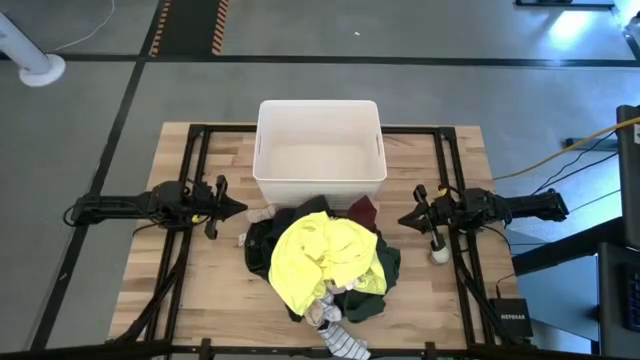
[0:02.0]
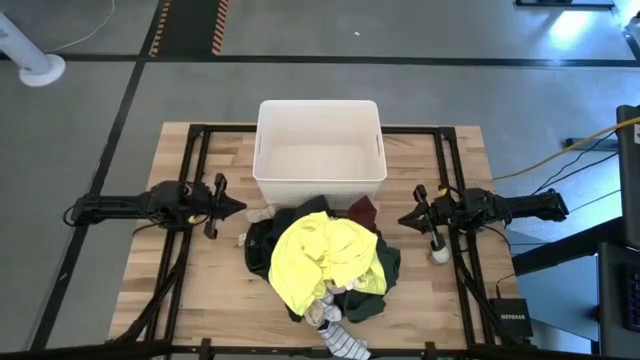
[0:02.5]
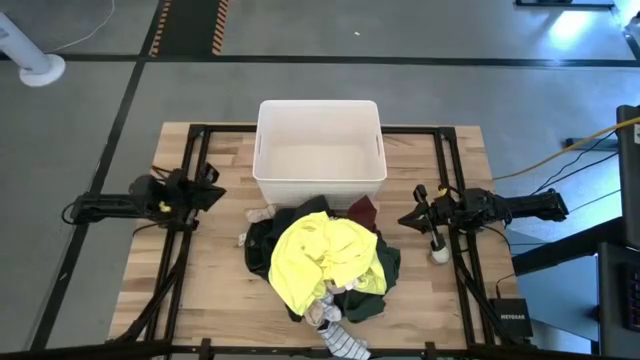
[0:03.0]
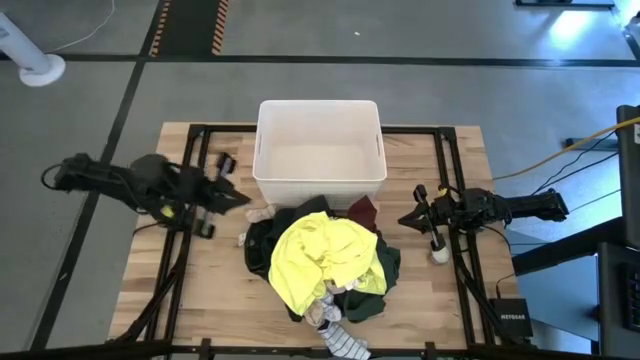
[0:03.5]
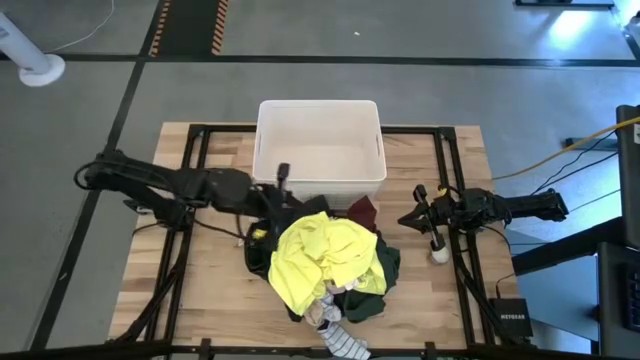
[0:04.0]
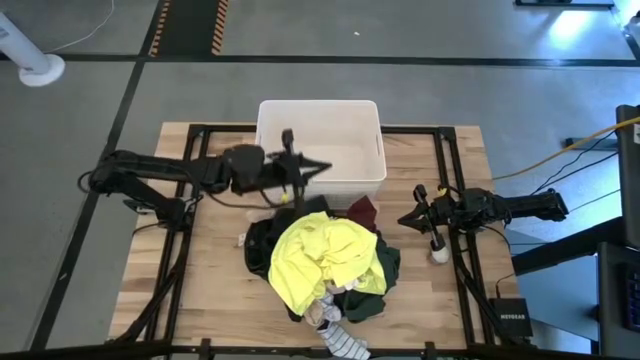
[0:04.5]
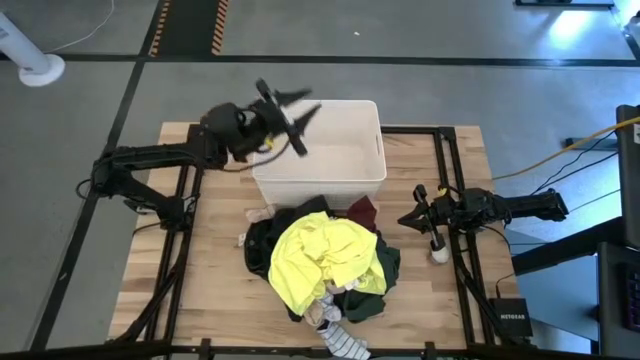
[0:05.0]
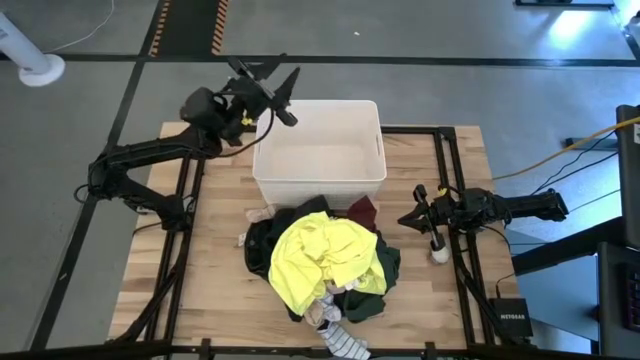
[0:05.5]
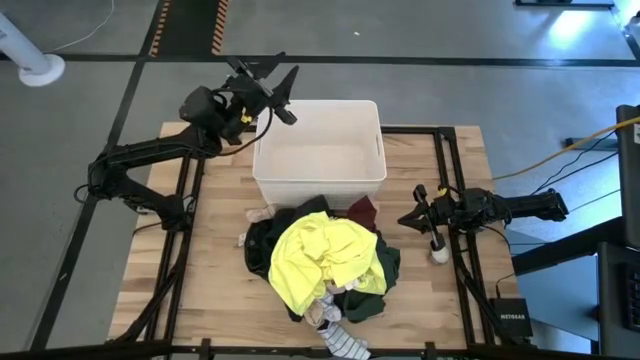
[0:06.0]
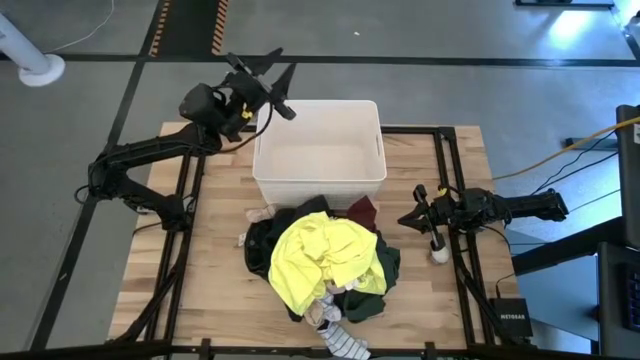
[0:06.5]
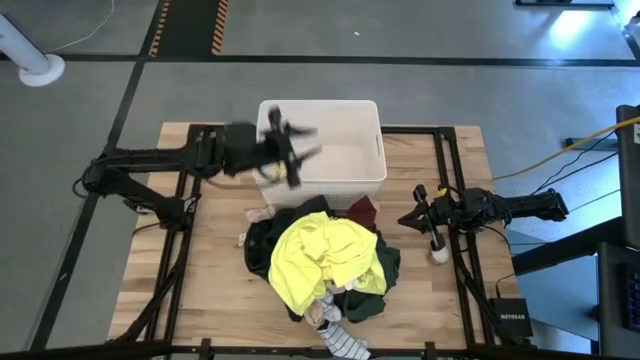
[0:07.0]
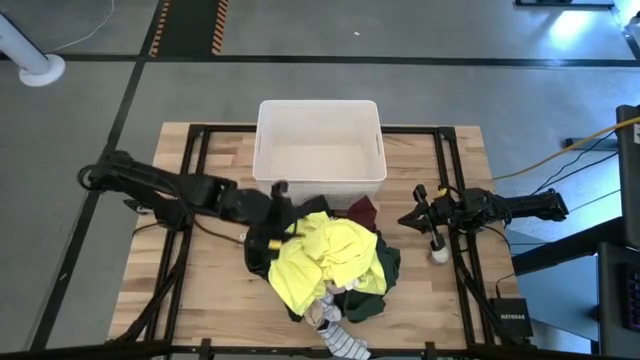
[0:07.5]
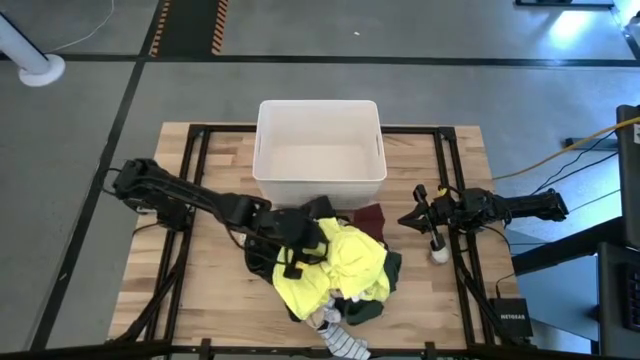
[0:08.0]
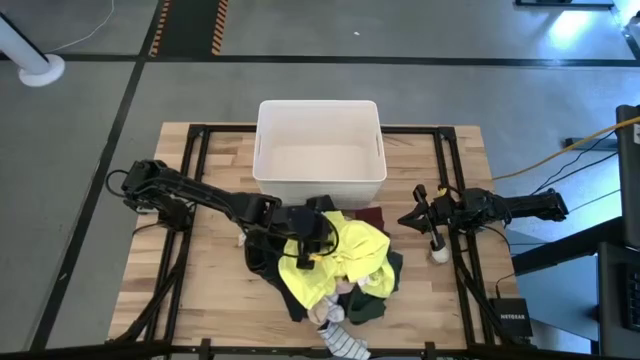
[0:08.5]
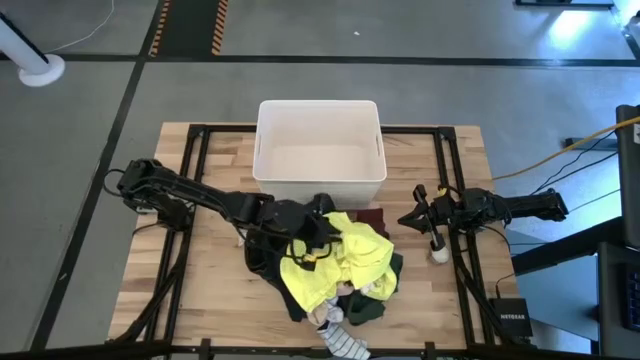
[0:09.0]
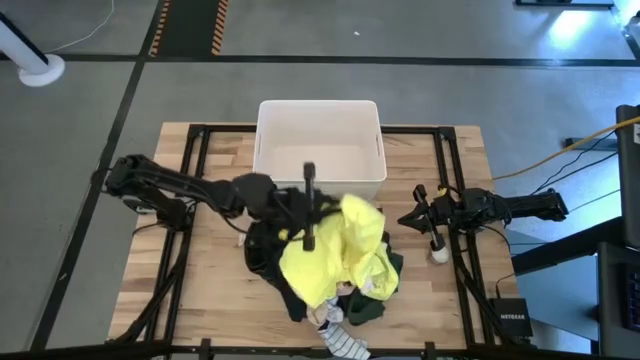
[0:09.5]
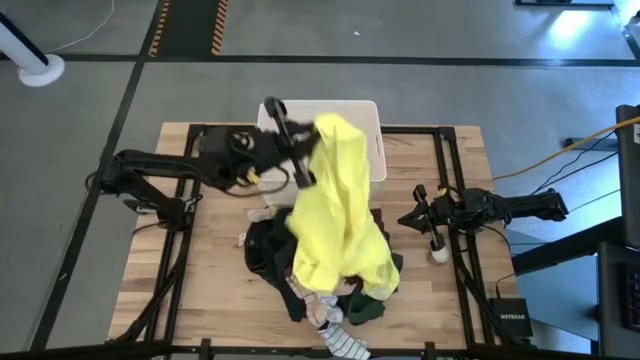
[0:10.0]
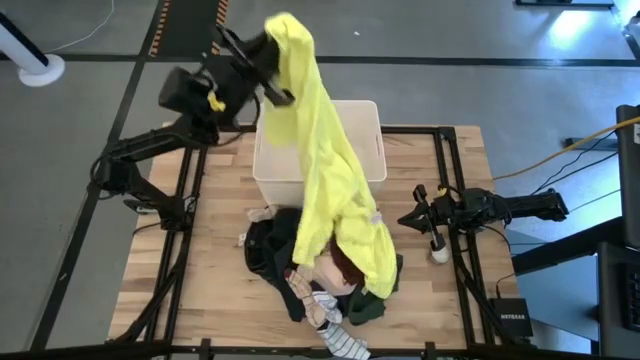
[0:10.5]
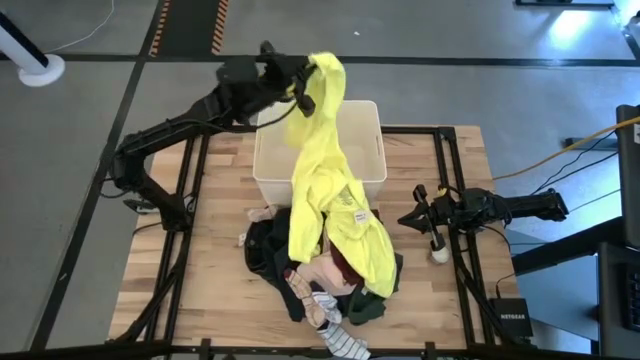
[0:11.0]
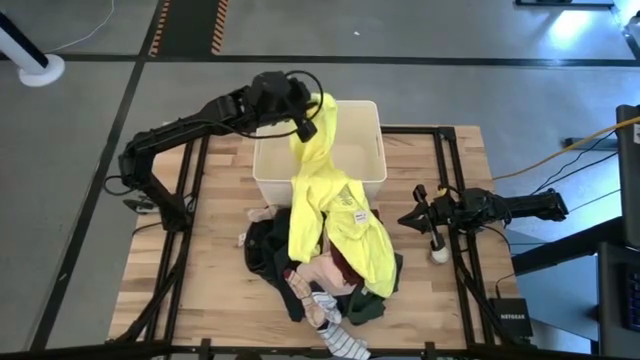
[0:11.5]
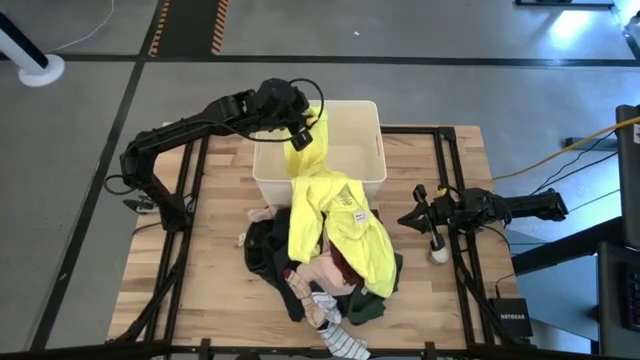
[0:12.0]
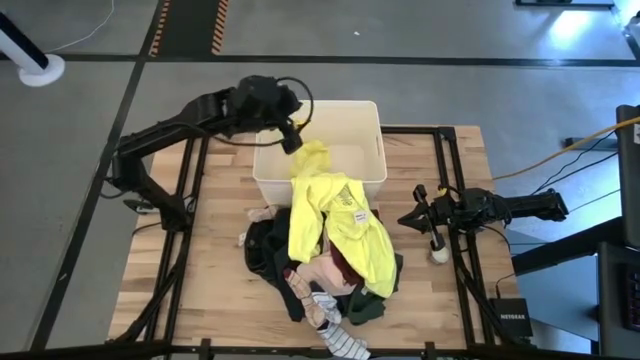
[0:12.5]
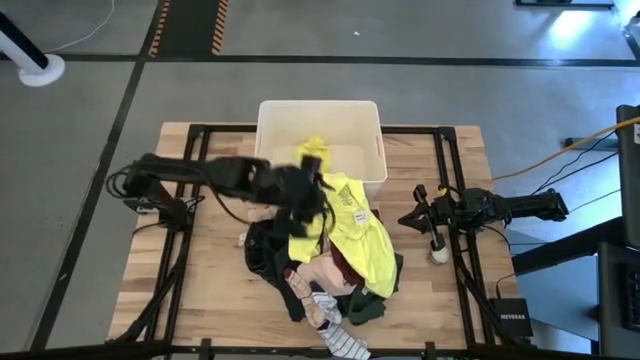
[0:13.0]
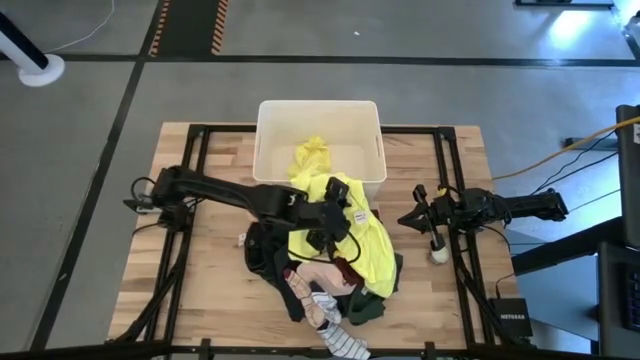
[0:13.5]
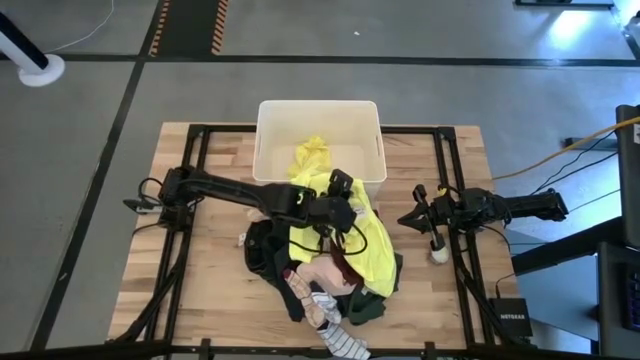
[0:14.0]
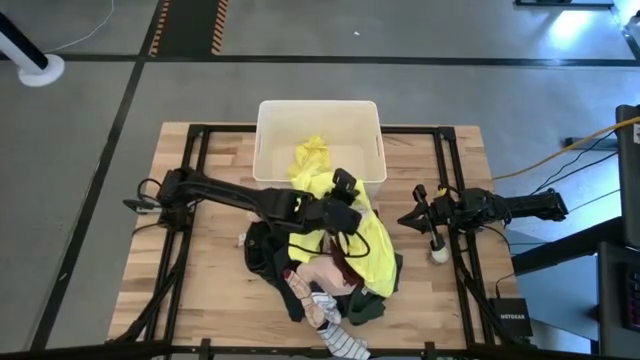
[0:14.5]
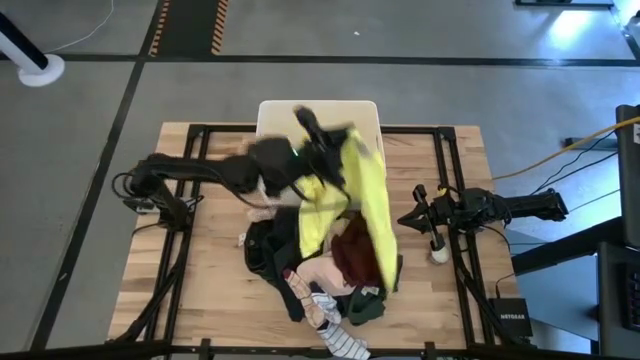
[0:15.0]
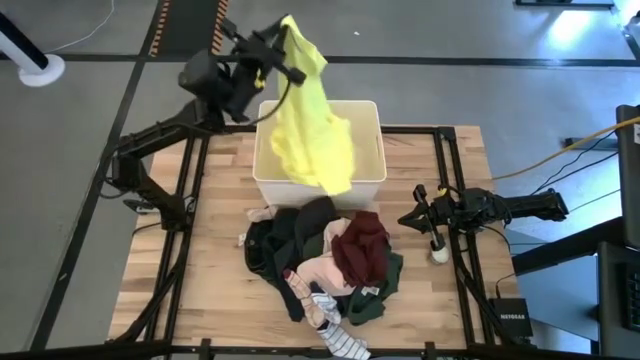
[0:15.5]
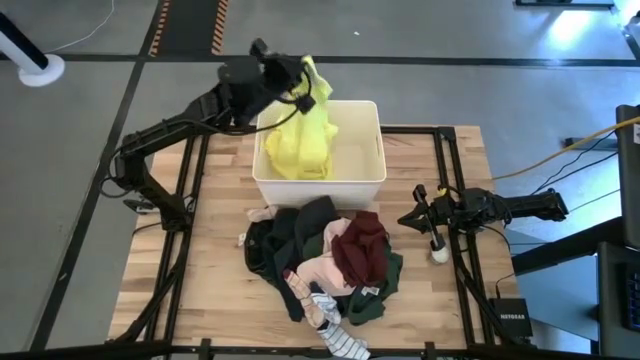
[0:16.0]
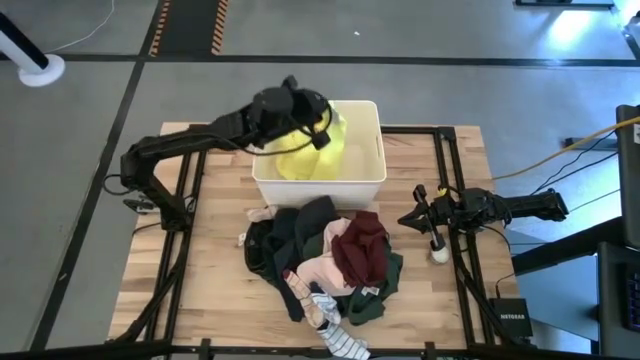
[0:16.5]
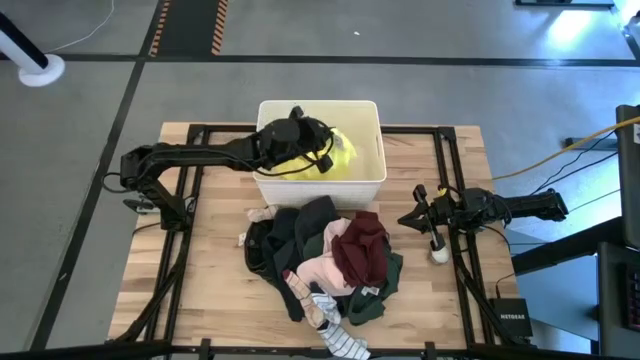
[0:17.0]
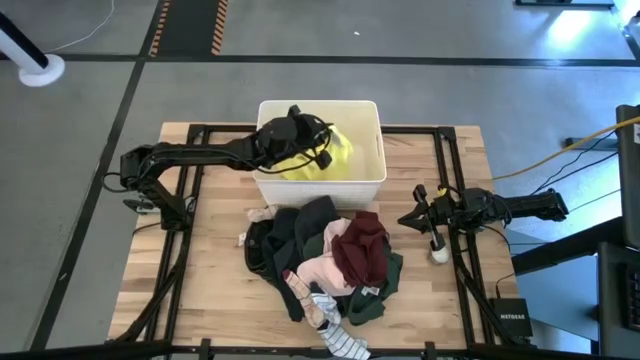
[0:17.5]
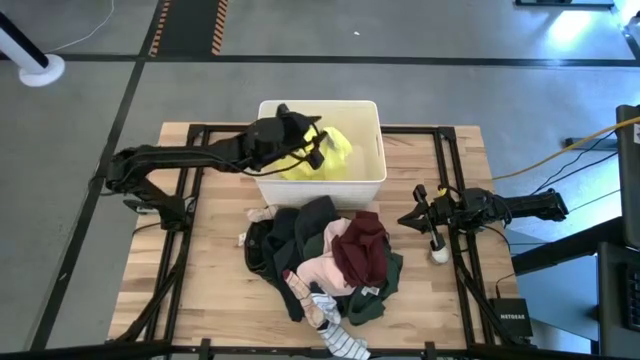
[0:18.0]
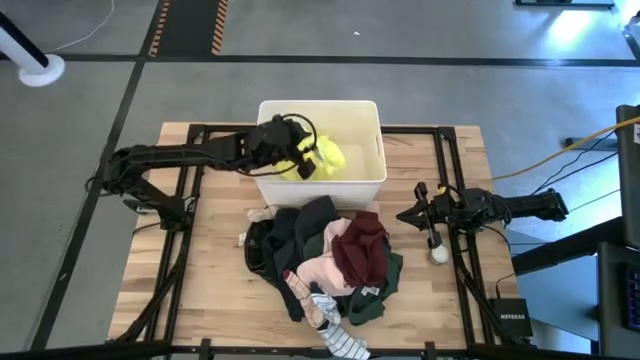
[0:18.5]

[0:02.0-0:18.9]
Task: Sort clothes
Put the yellow shirt into the white bin

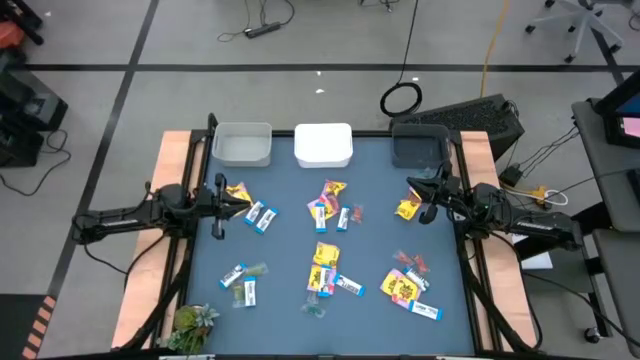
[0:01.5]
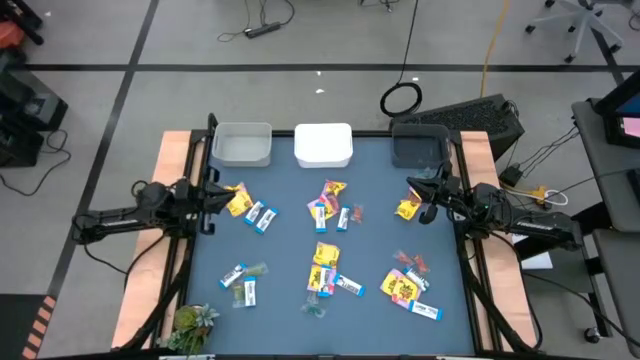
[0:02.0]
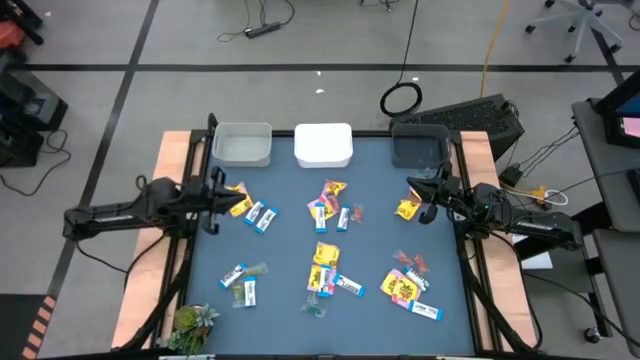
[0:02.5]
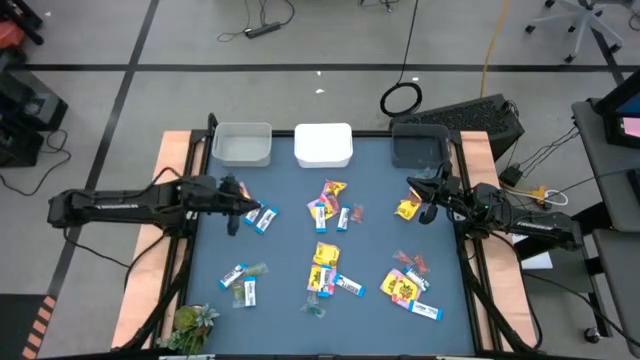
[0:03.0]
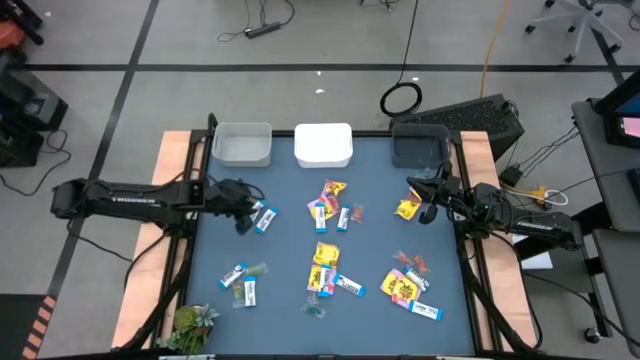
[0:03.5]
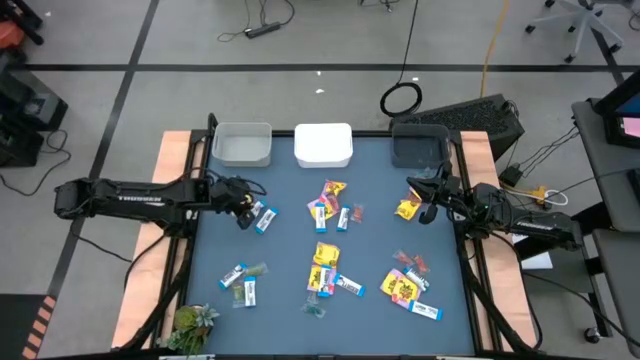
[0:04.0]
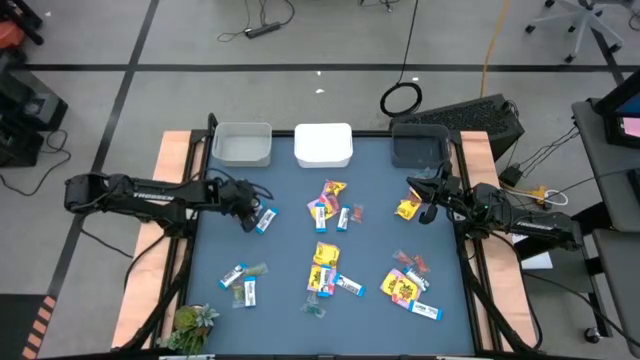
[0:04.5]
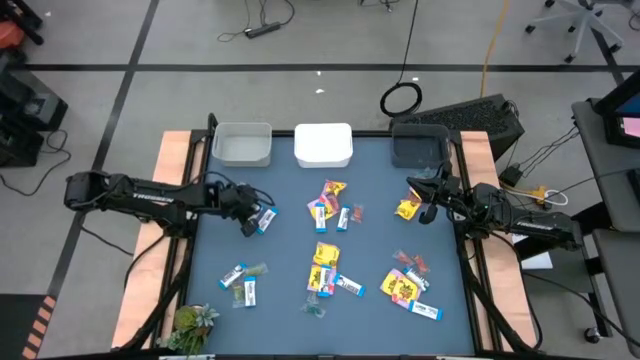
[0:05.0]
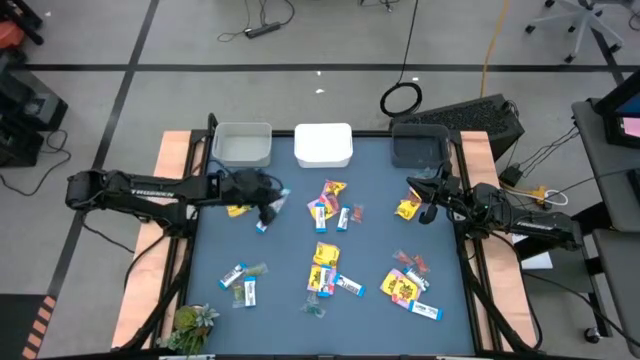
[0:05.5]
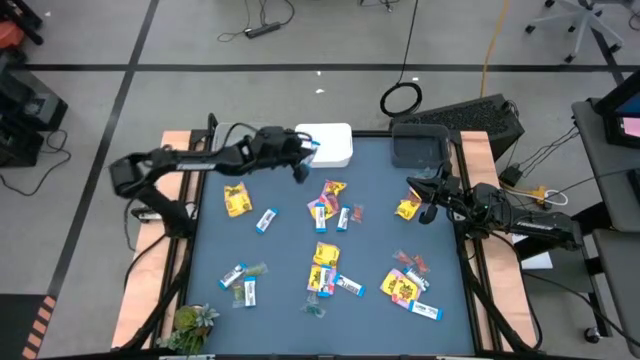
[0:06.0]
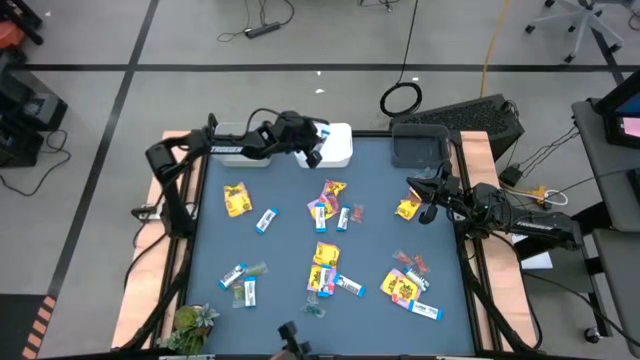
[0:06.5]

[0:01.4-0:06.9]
Task: Sort candy
Put the white chocolate into the white bin
